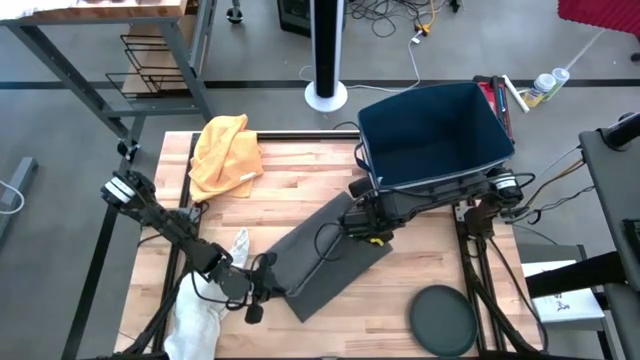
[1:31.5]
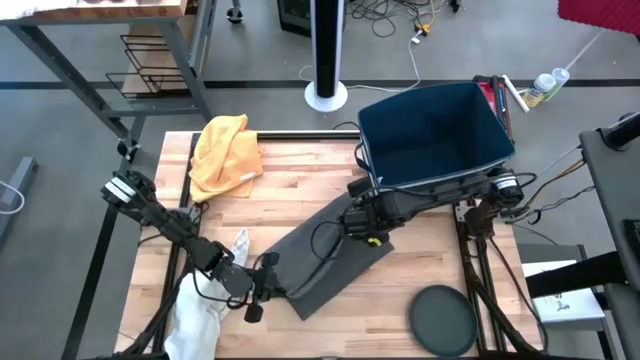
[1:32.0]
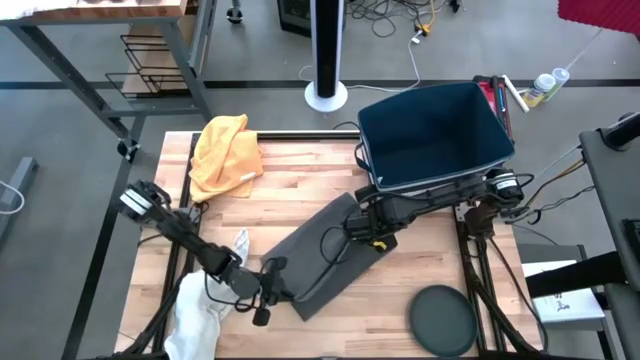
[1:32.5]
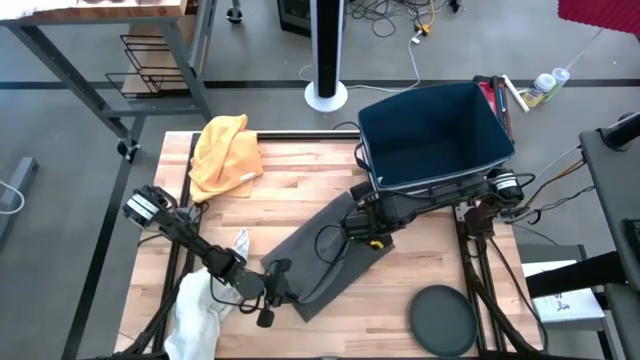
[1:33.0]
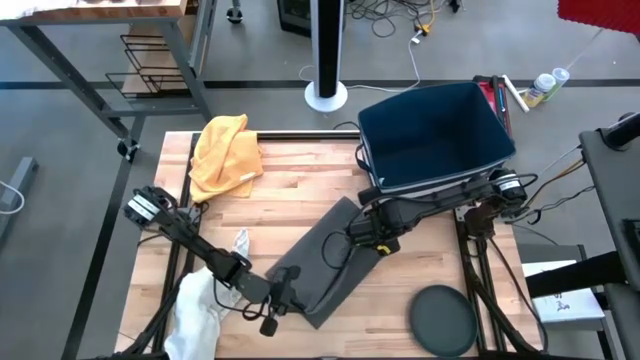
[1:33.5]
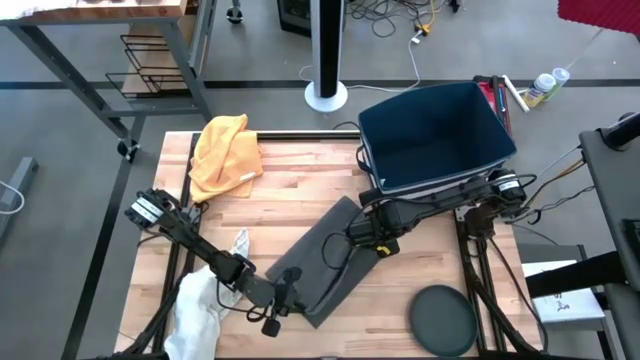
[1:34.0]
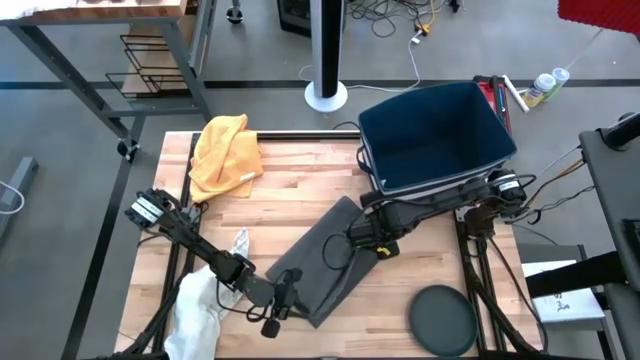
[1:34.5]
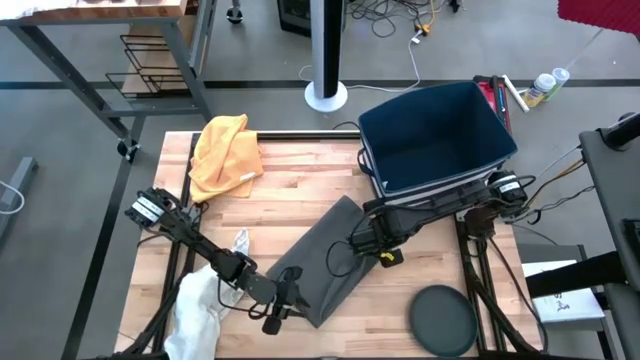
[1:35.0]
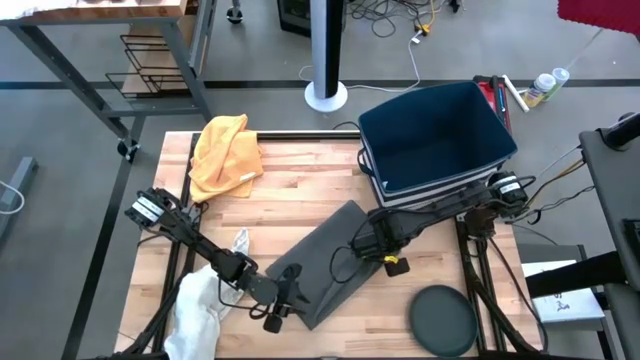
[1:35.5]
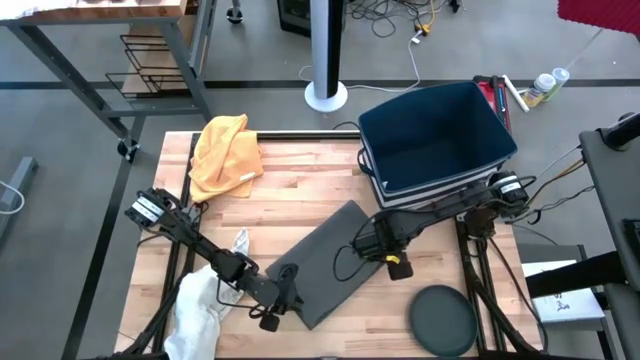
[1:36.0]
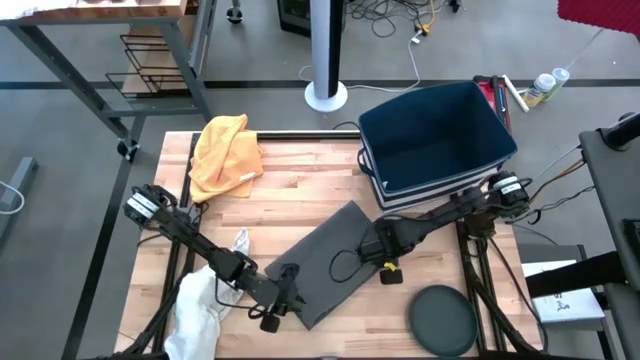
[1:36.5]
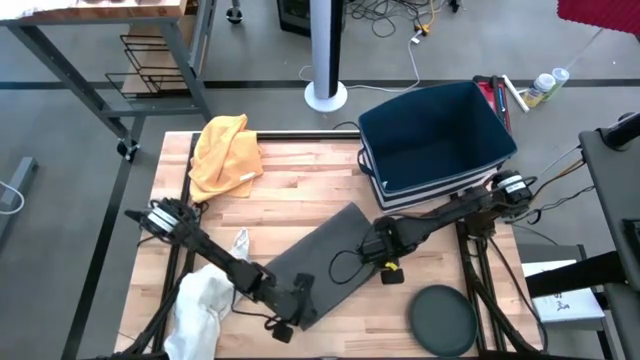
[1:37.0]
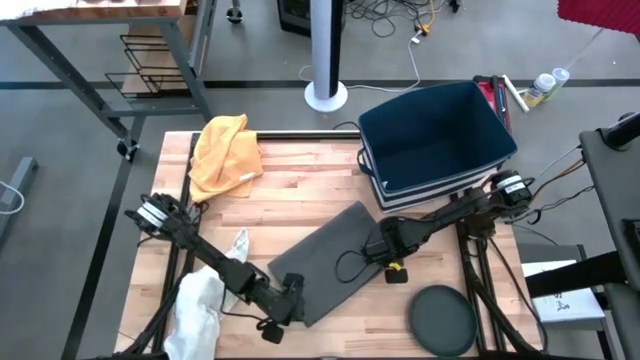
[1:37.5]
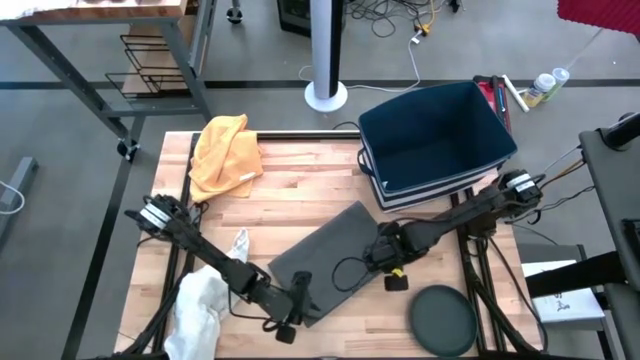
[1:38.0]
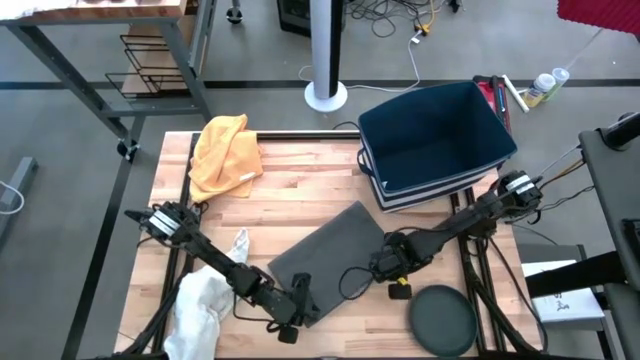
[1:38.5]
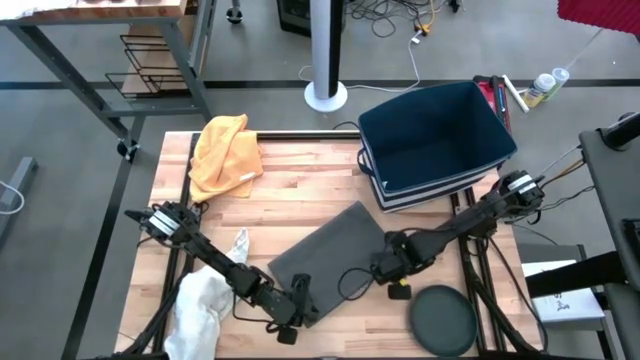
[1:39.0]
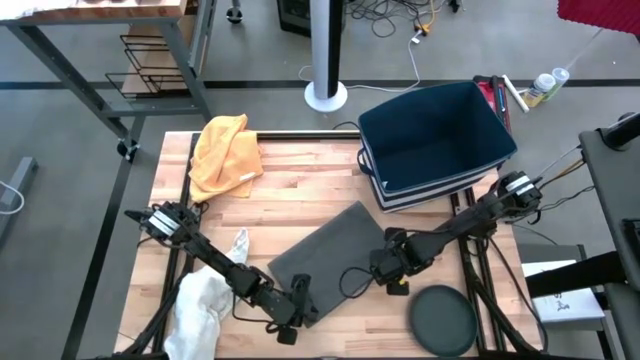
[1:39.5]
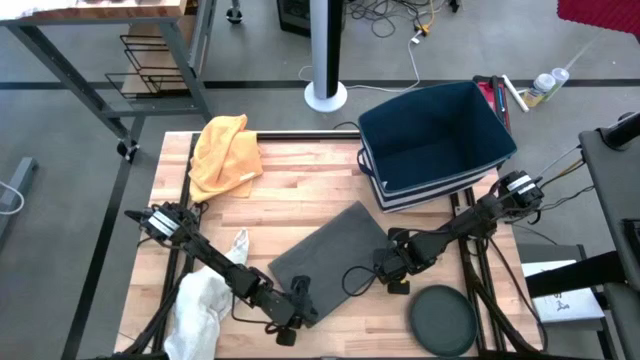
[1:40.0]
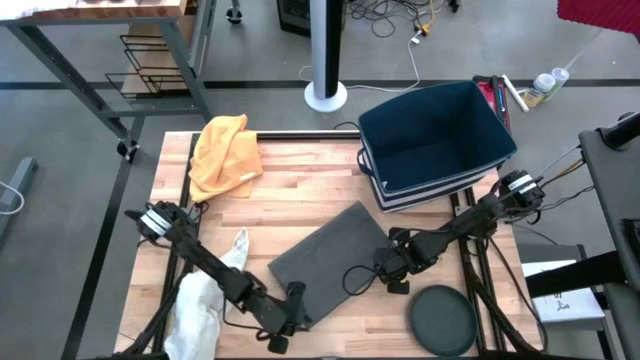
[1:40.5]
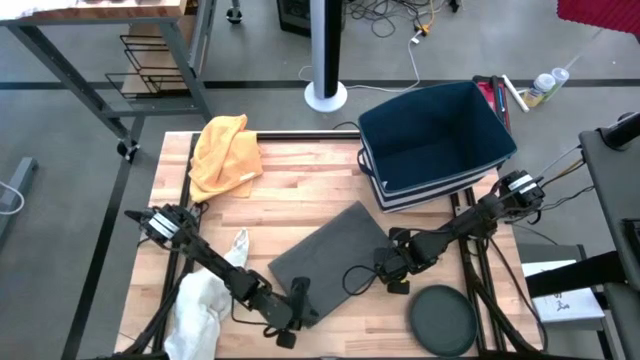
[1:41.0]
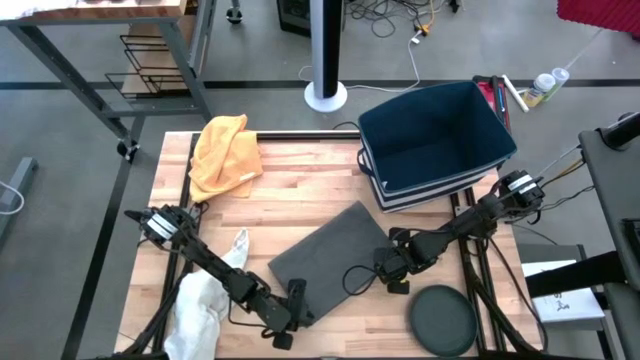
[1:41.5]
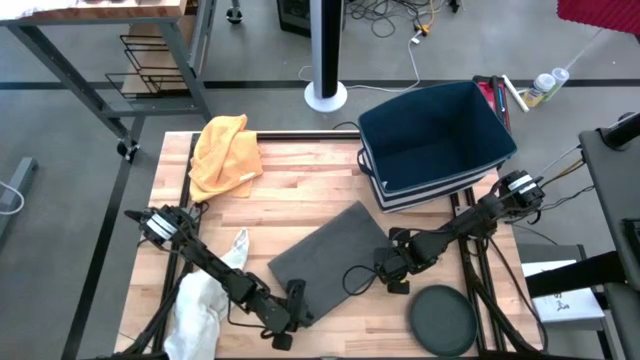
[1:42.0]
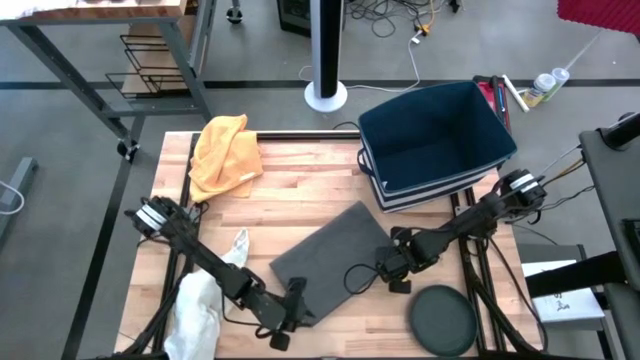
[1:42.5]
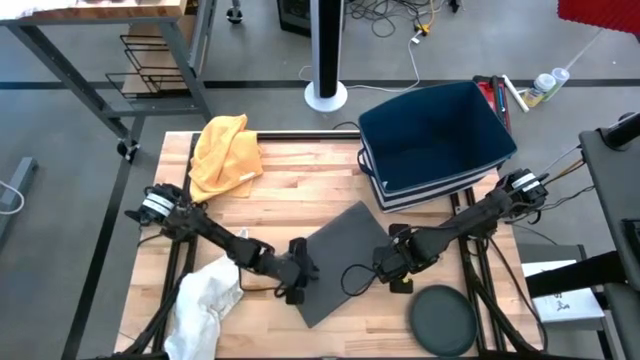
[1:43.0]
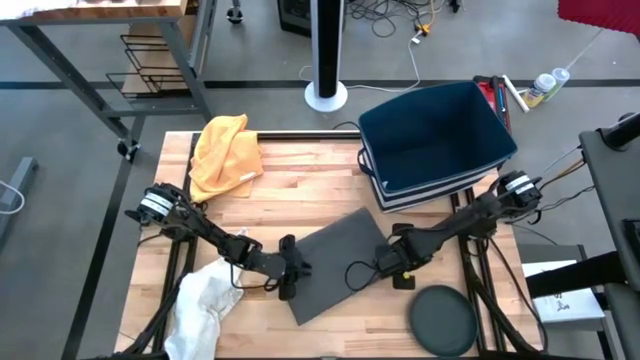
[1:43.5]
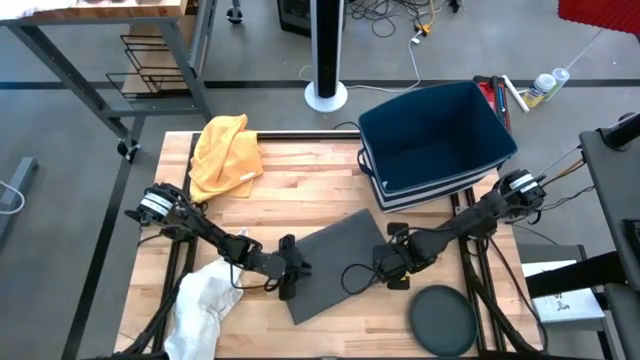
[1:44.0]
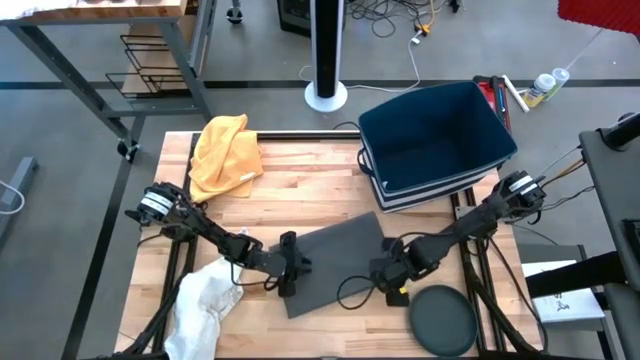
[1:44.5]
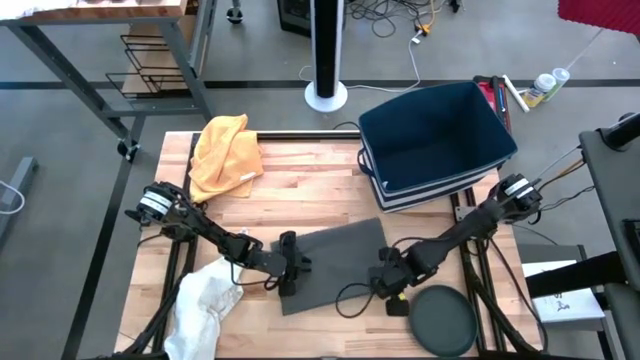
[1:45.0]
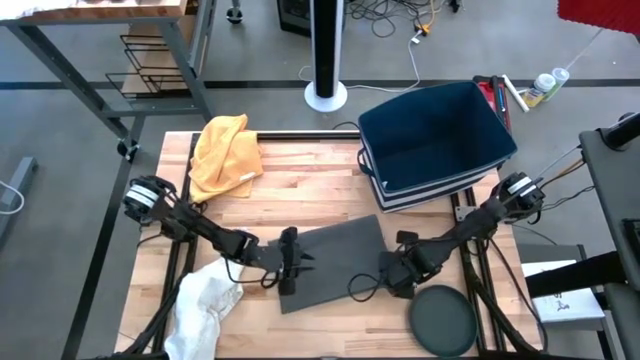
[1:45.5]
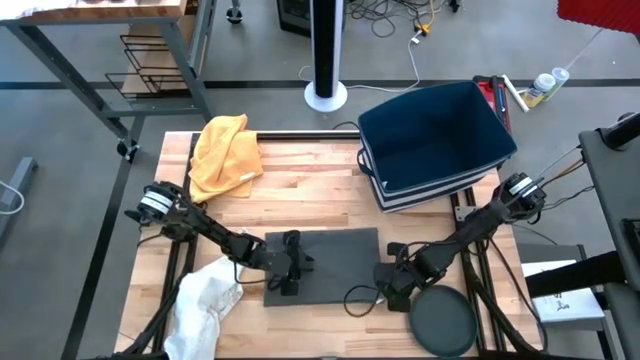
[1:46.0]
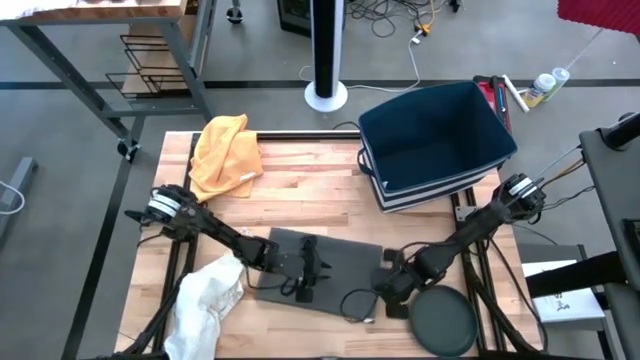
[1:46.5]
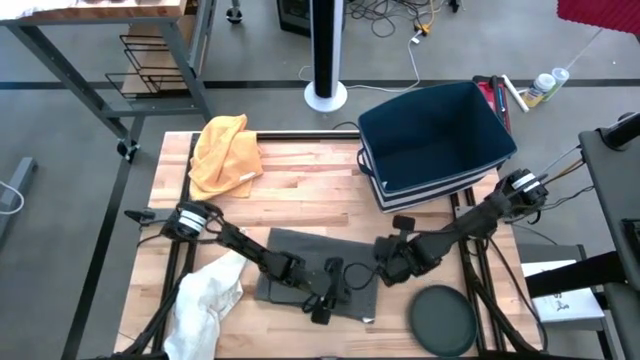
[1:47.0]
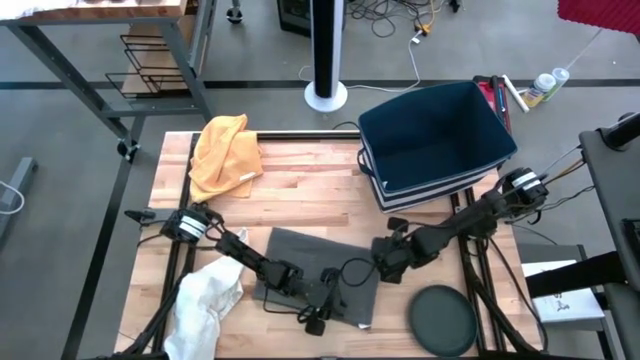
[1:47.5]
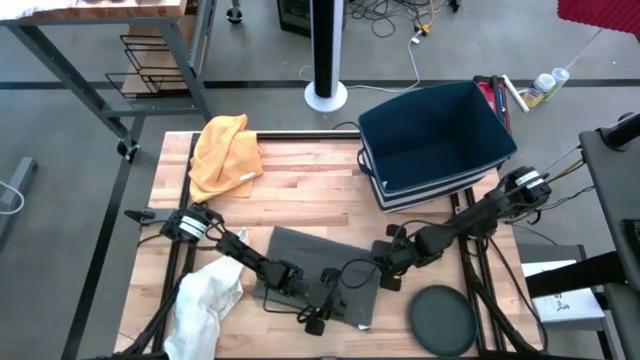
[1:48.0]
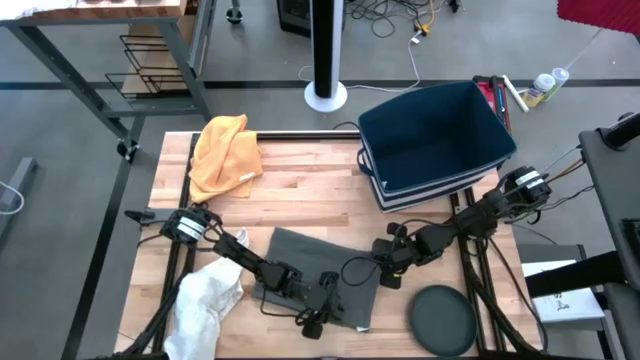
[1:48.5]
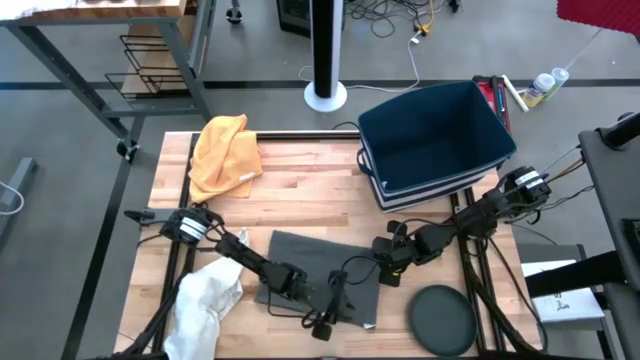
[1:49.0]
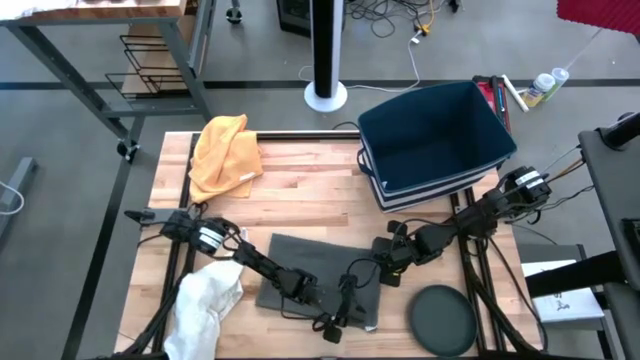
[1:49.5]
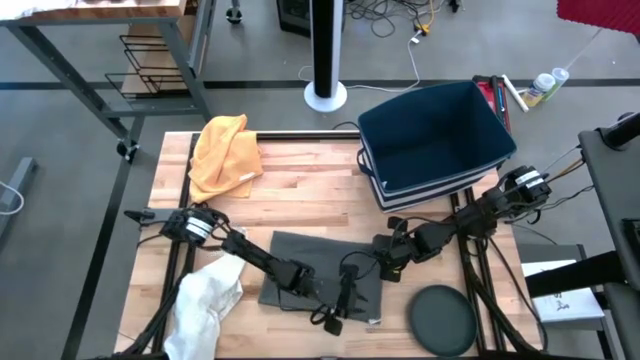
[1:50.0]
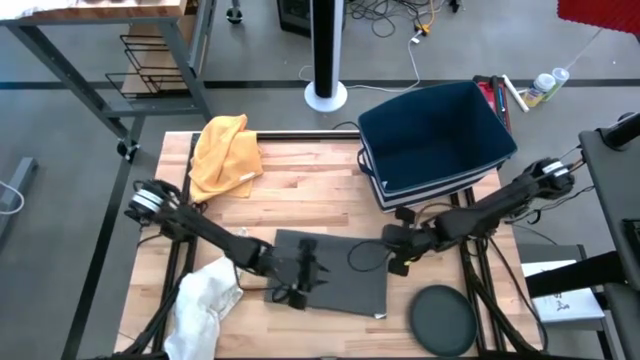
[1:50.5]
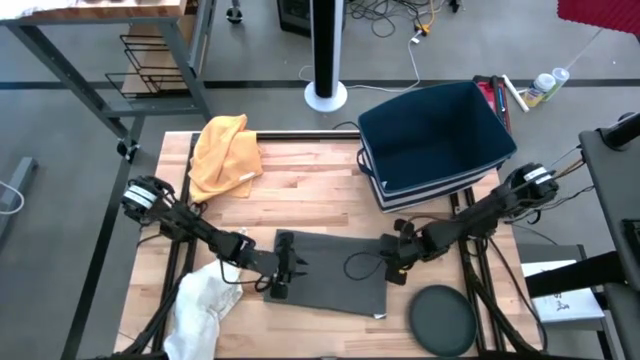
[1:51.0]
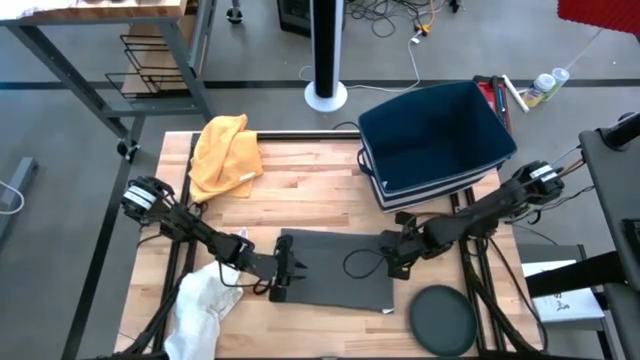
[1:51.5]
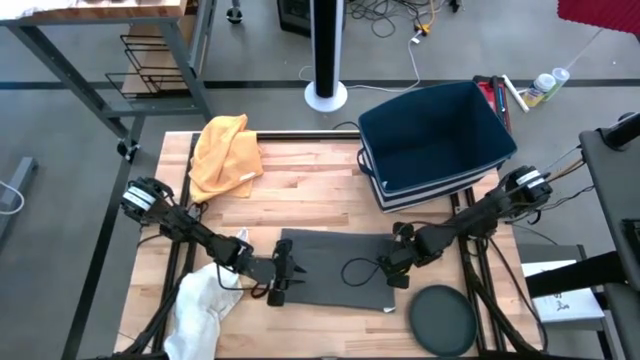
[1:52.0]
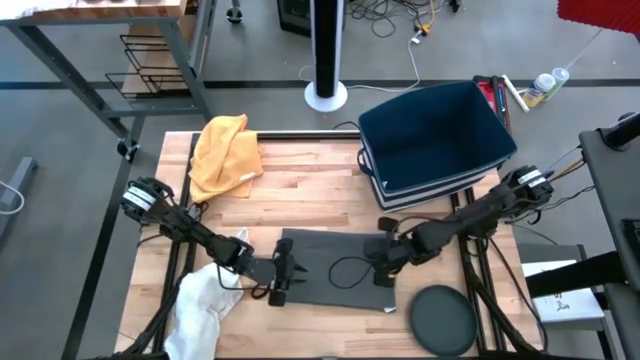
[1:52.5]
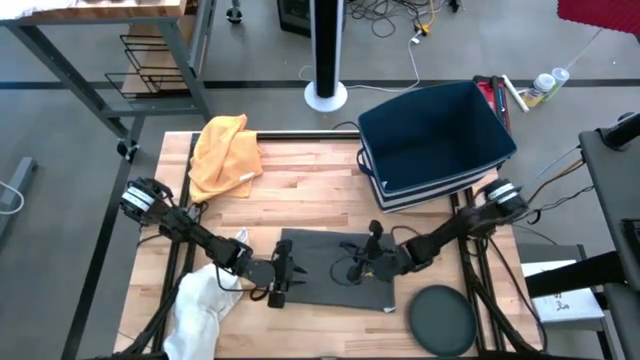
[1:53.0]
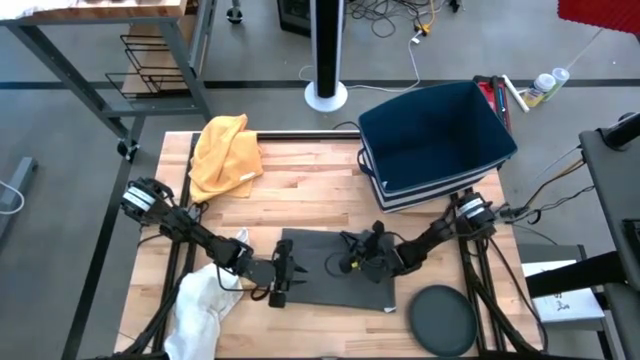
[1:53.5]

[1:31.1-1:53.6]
Task: Fold kitchen towel into neat rectangle
Fold the gray towel
